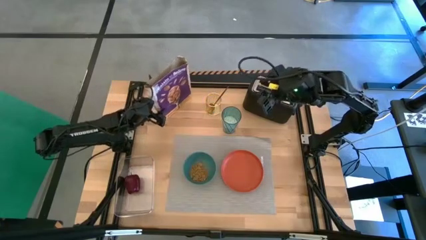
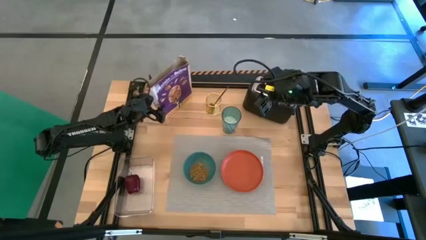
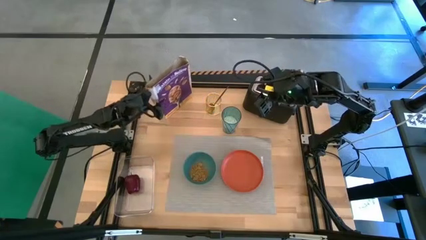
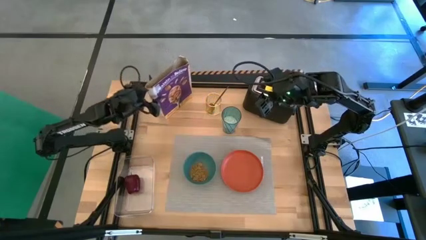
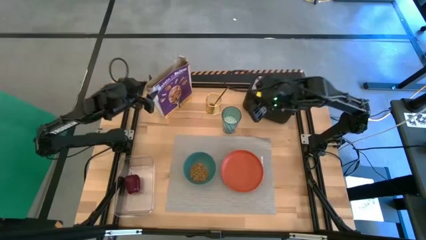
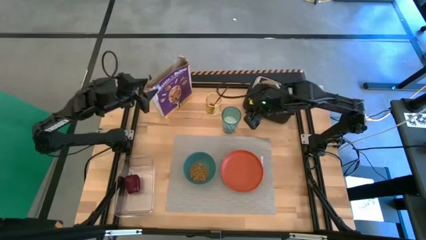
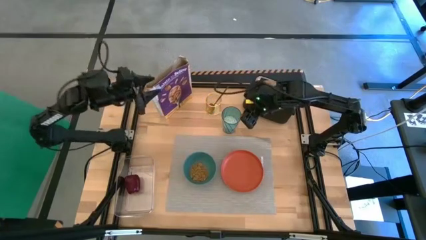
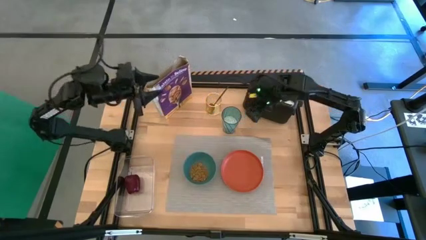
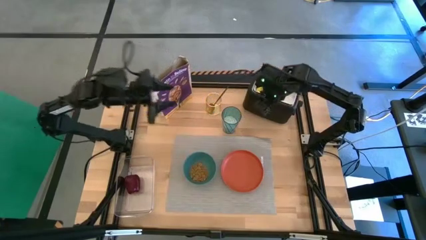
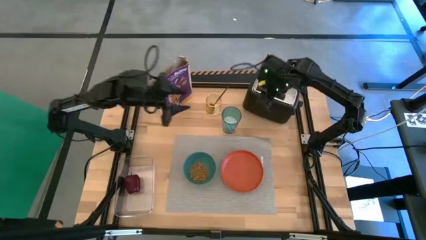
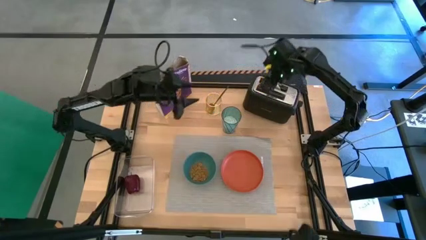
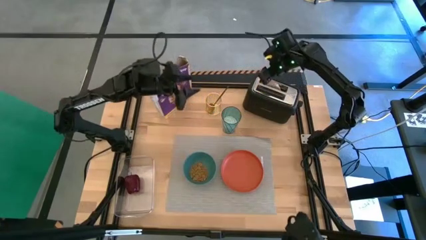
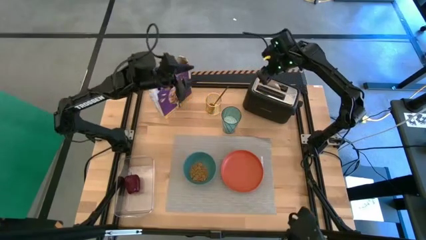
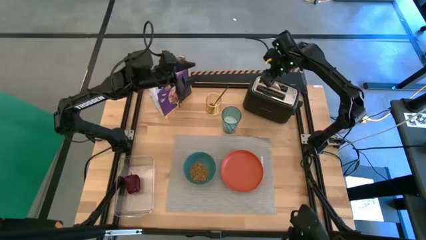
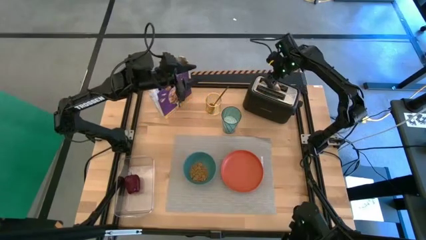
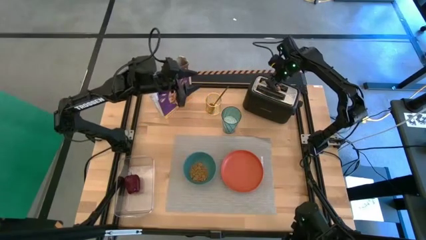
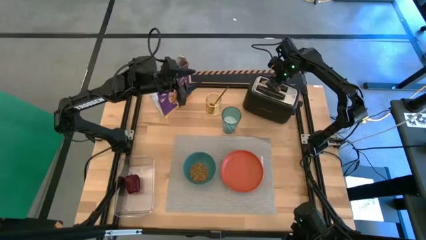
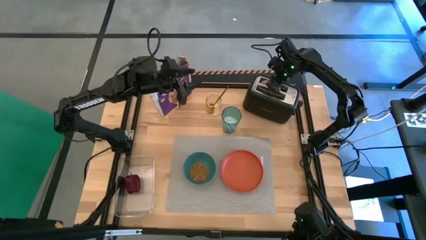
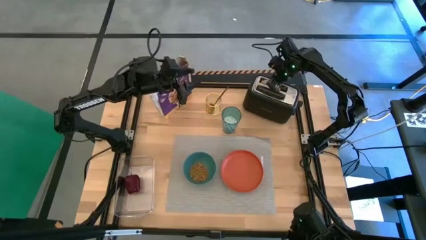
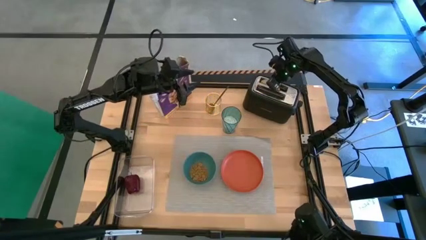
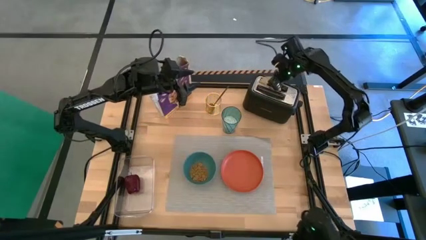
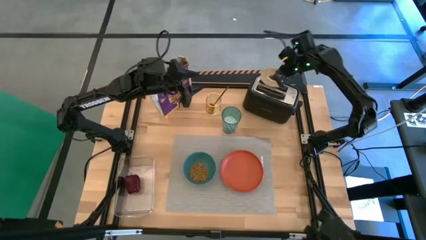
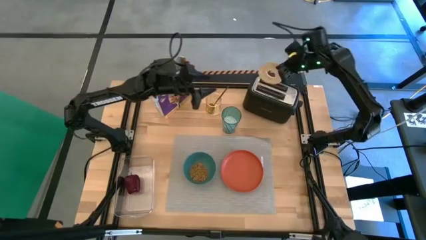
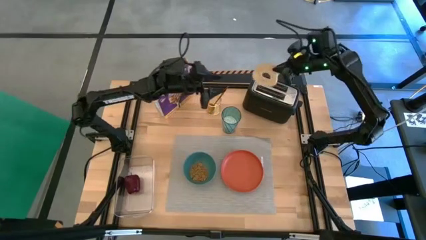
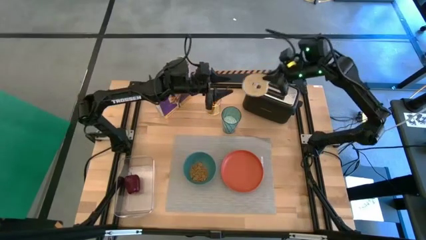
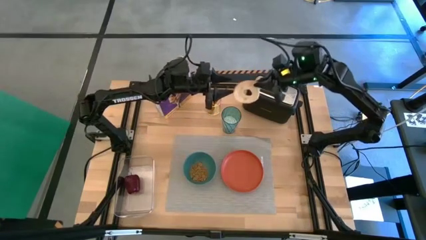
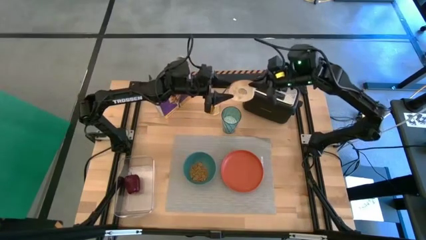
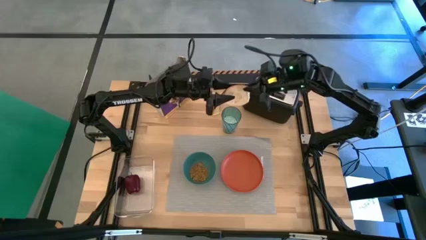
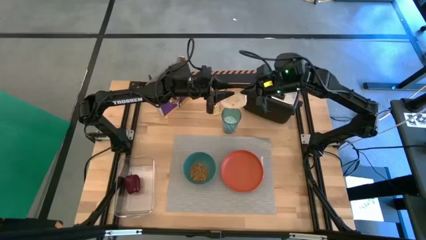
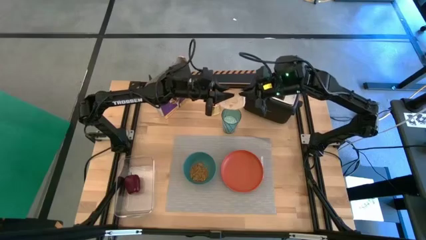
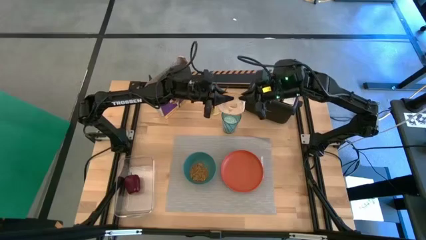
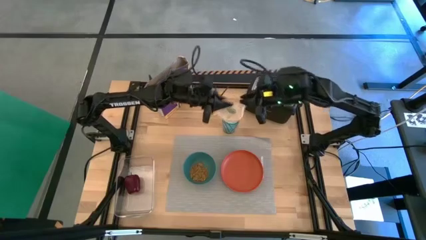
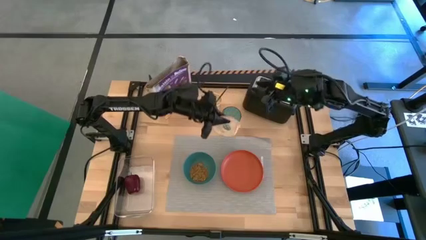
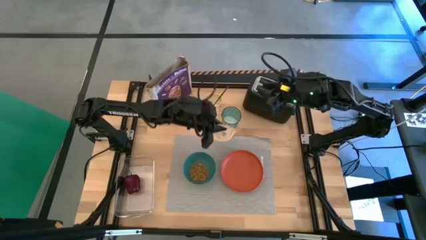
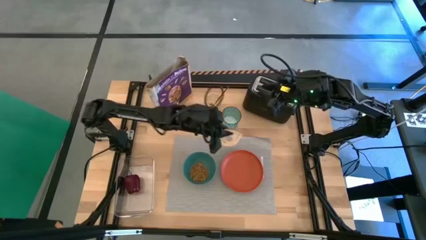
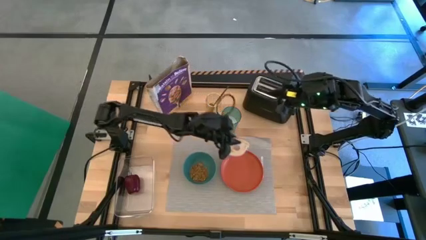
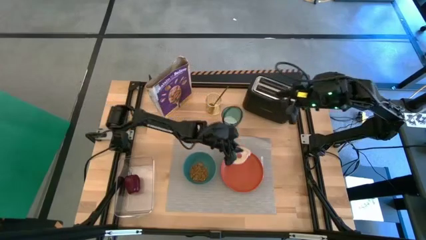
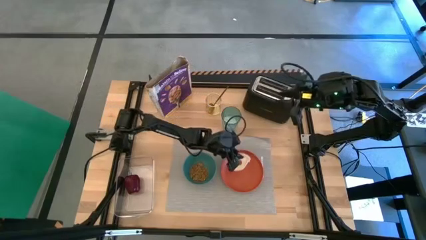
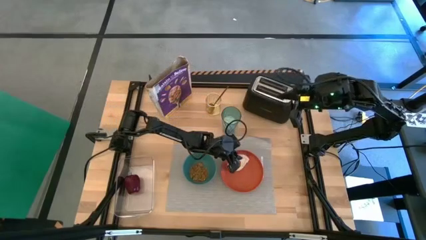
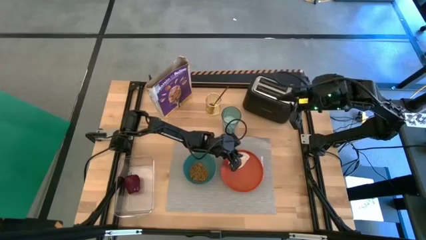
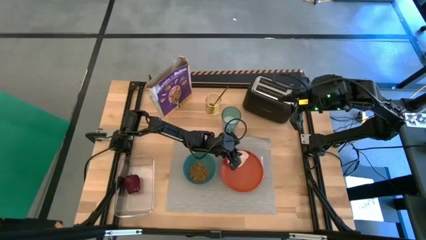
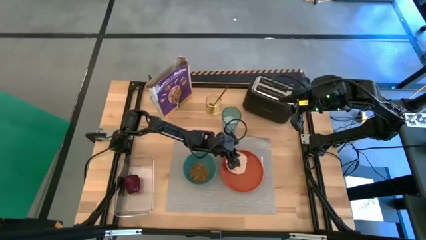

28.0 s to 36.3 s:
Task: Arrange a breakfast setting
Put the toasted bagel from the toaster on the orange plate

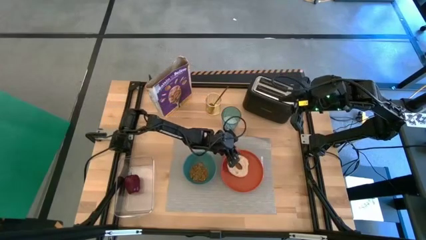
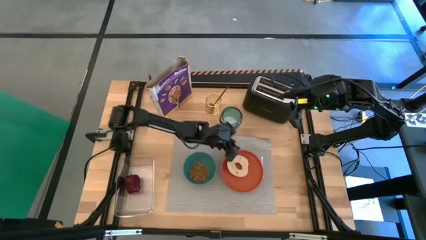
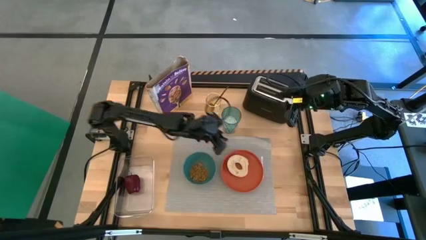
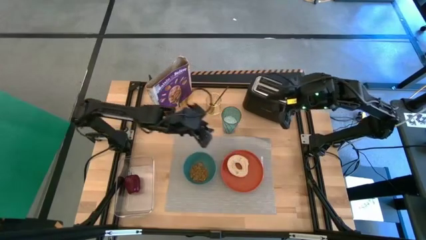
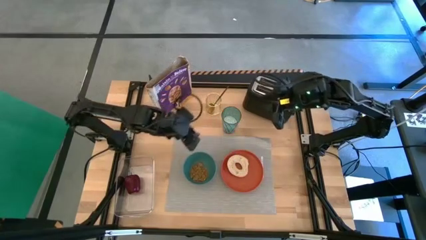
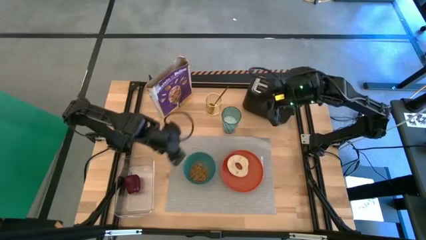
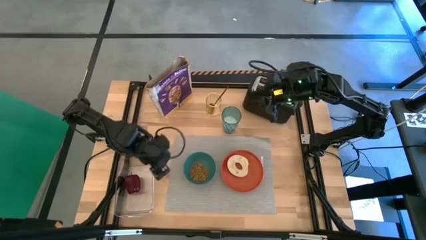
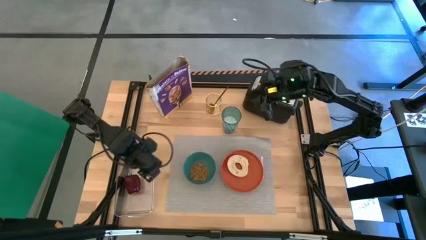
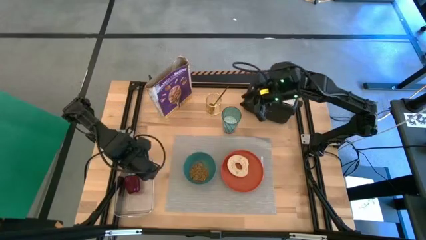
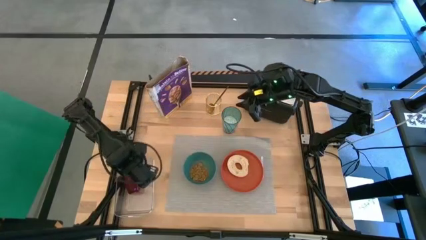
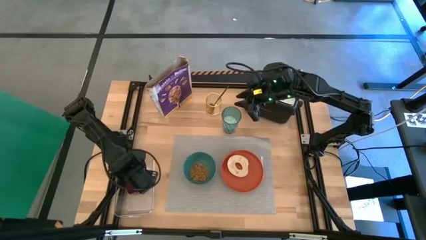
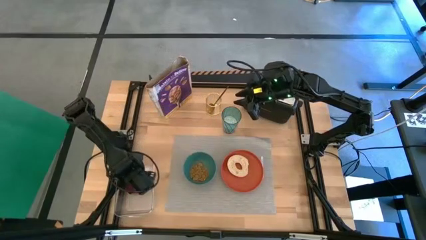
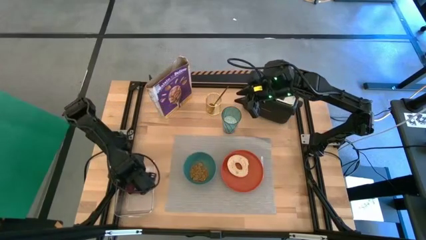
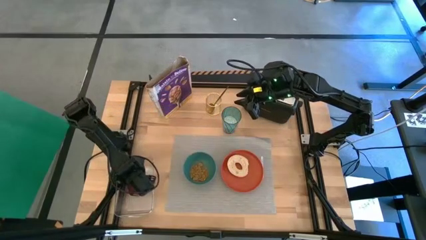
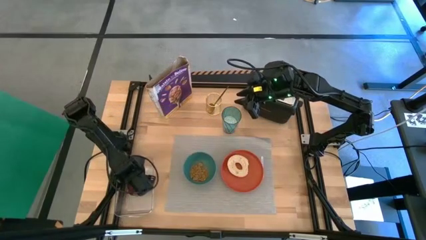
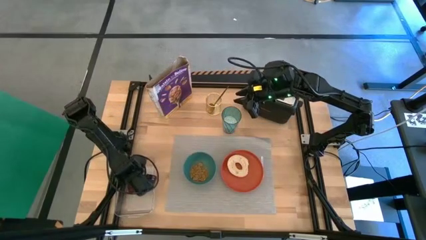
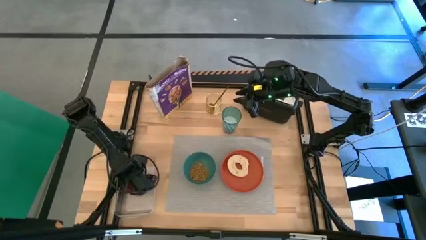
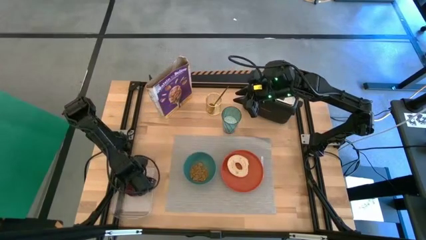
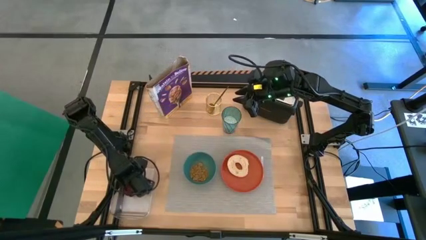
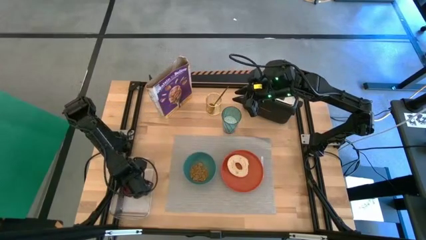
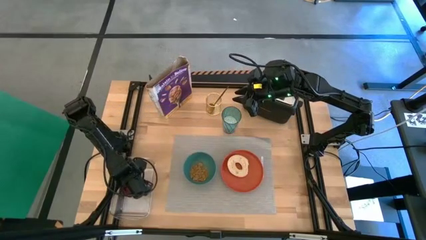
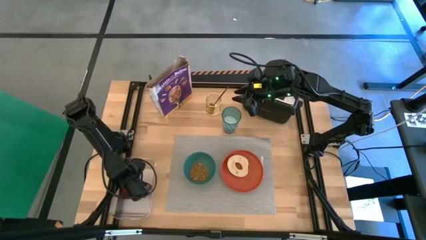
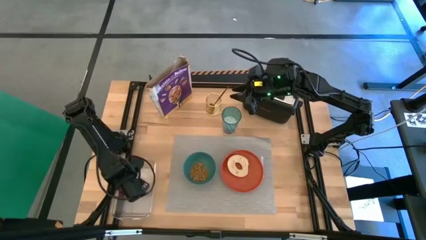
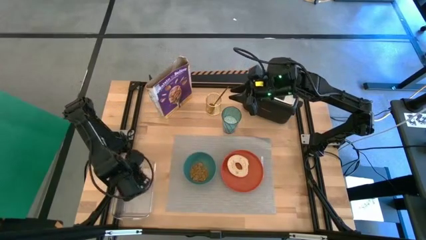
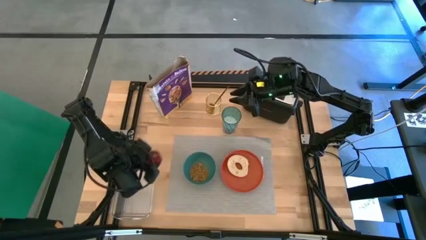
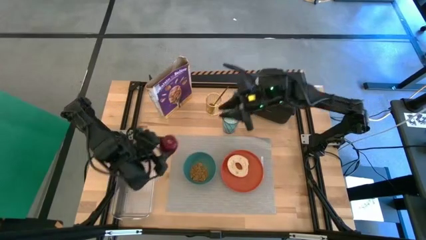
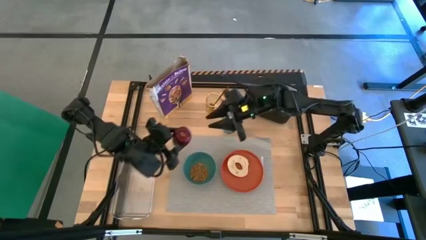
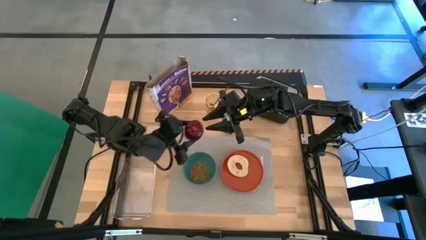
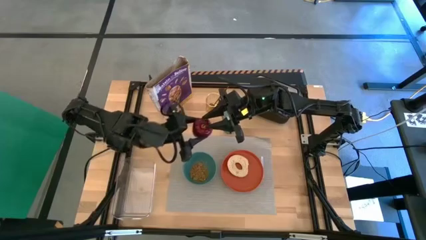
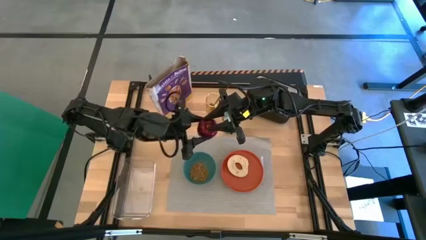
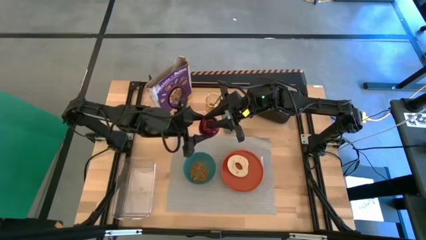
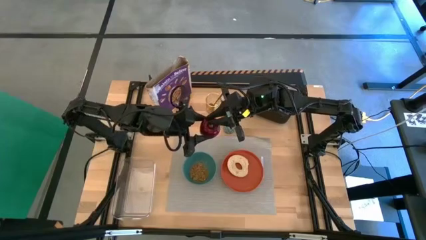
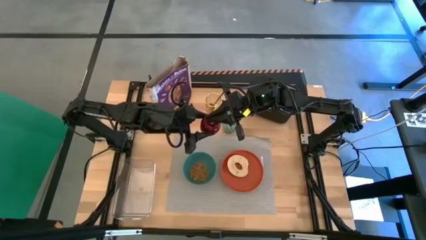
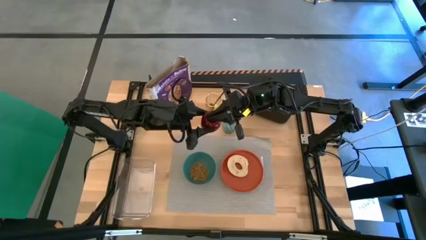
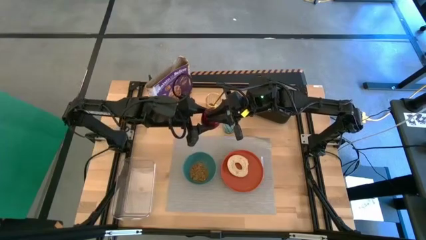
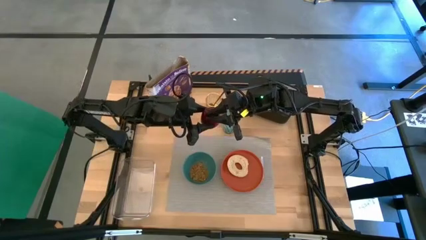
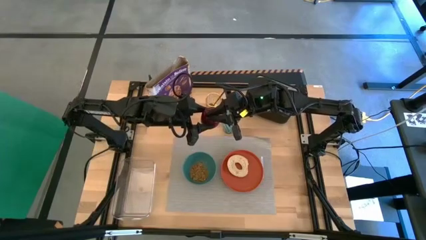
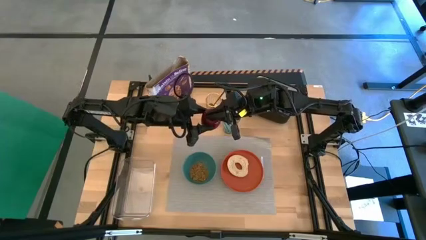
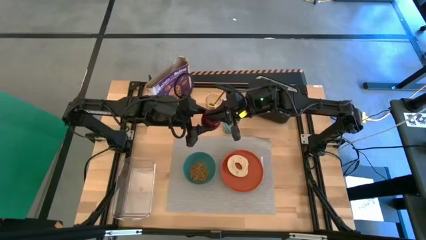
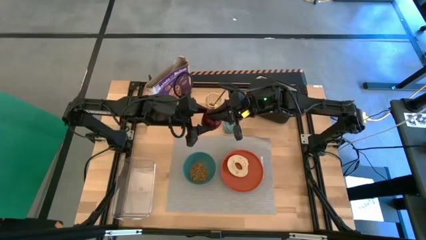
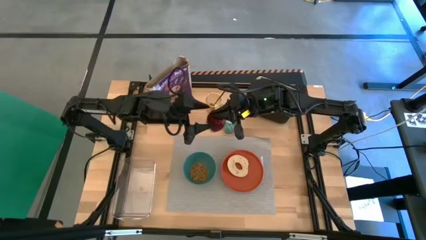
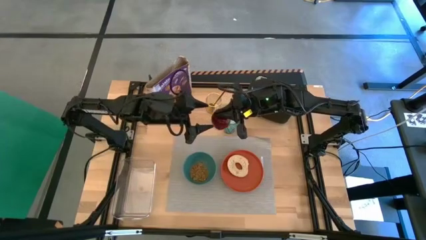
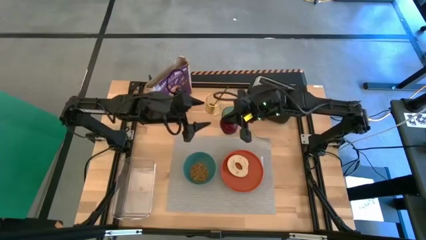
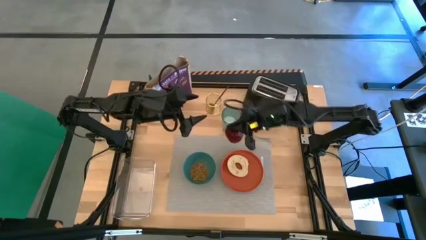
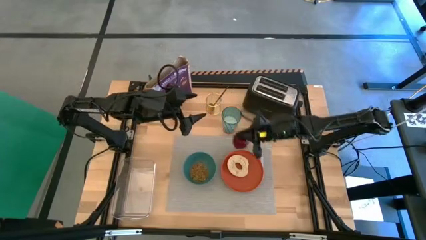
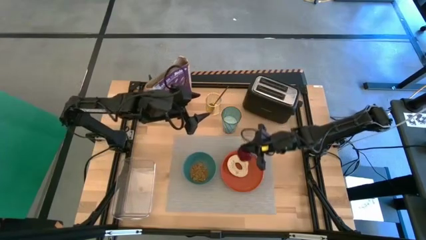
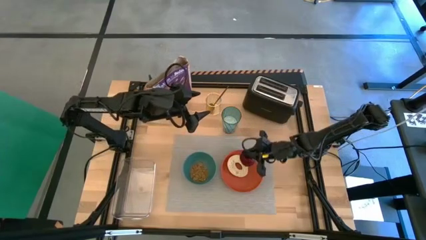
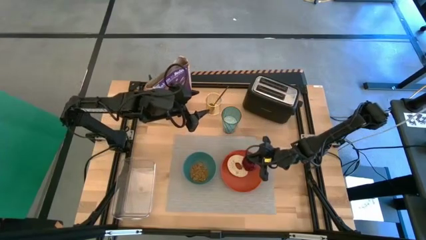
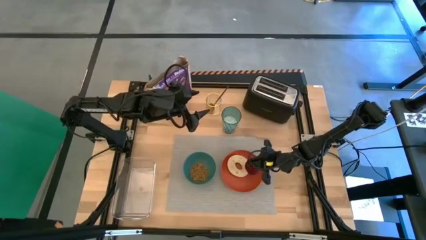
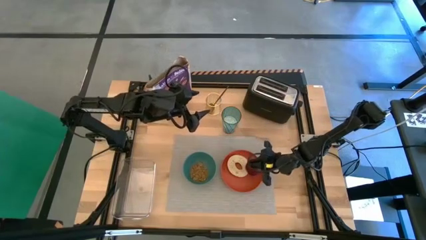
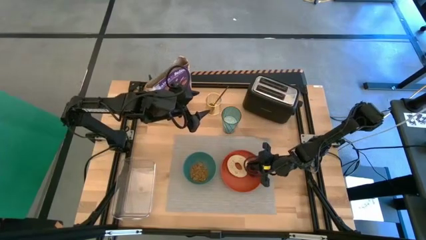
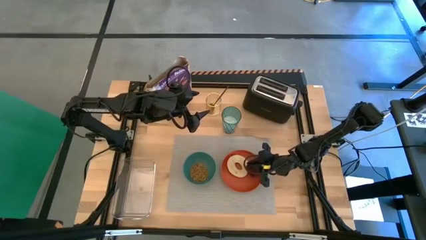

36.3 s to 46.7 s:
Put the red apple on the orange plate
